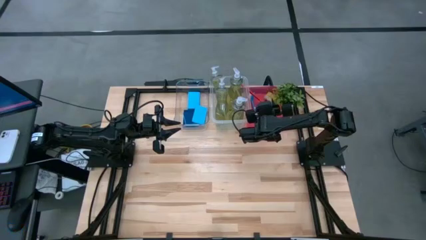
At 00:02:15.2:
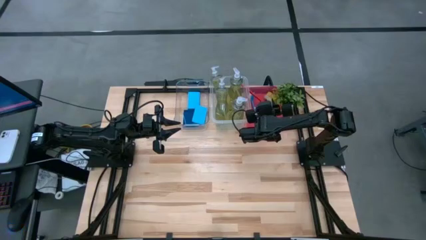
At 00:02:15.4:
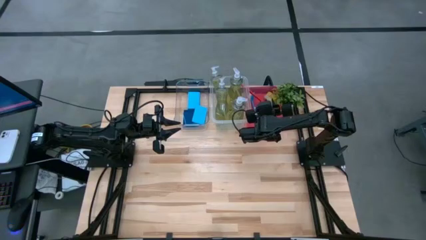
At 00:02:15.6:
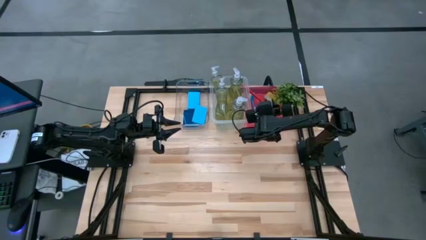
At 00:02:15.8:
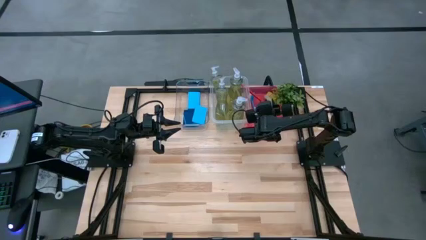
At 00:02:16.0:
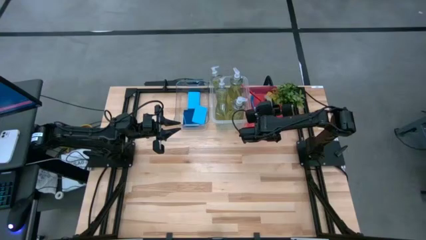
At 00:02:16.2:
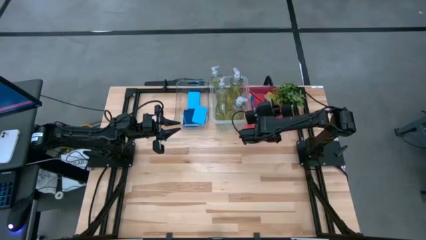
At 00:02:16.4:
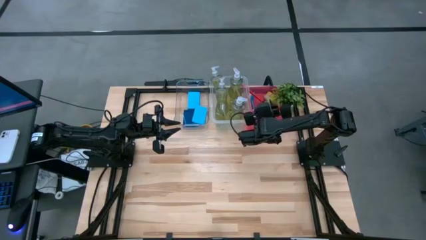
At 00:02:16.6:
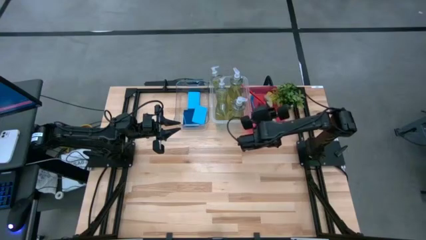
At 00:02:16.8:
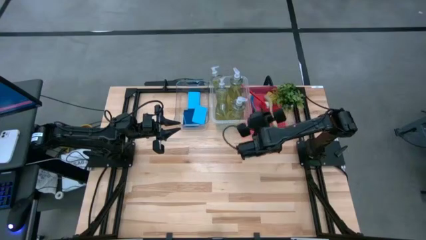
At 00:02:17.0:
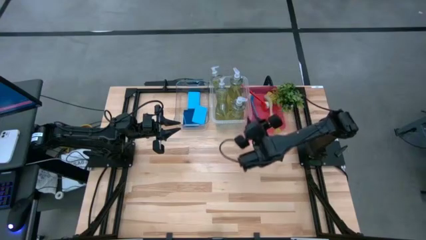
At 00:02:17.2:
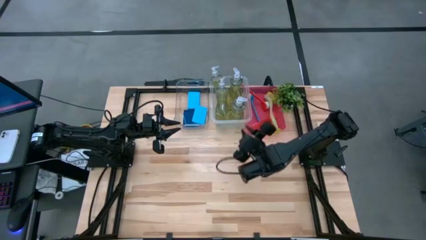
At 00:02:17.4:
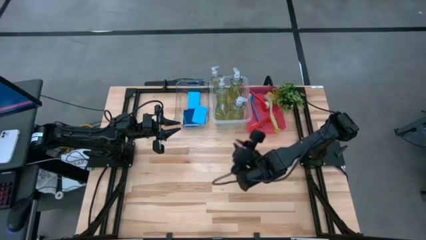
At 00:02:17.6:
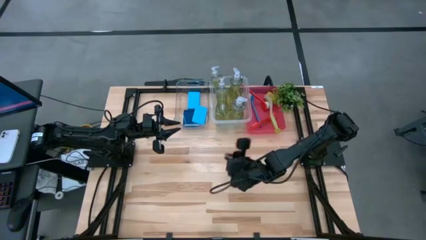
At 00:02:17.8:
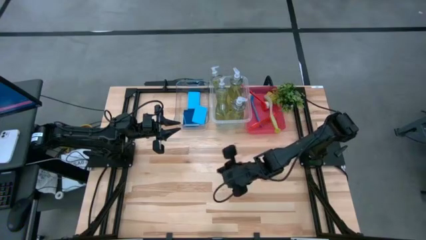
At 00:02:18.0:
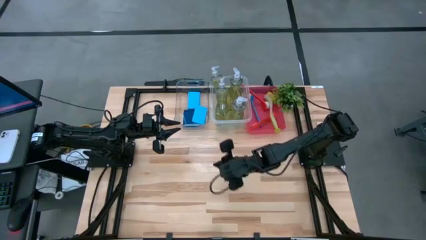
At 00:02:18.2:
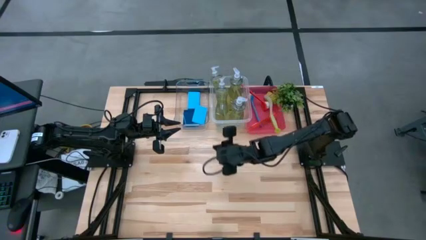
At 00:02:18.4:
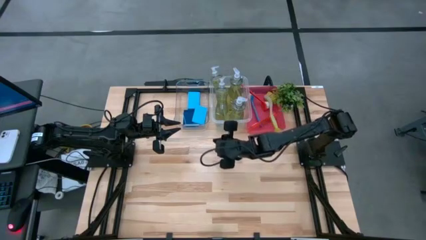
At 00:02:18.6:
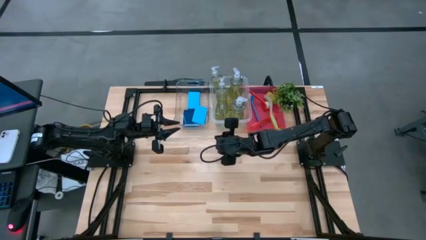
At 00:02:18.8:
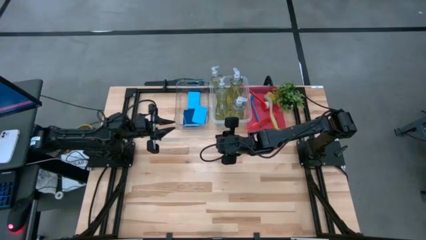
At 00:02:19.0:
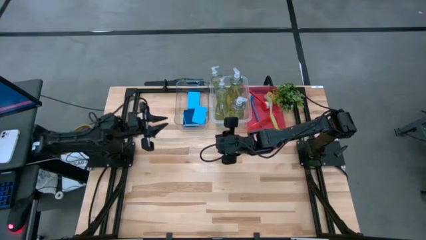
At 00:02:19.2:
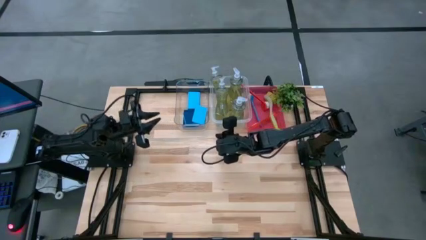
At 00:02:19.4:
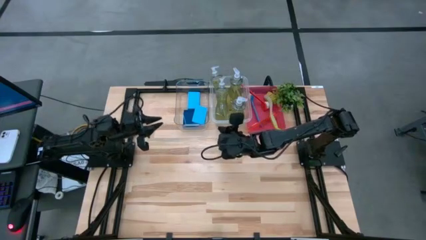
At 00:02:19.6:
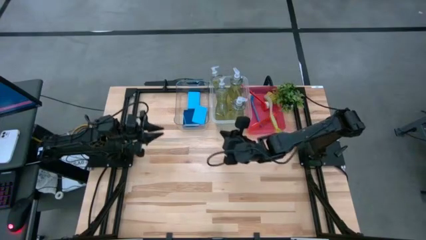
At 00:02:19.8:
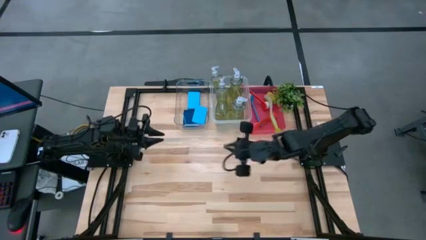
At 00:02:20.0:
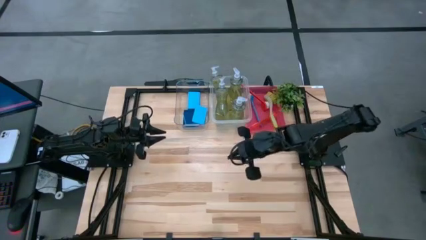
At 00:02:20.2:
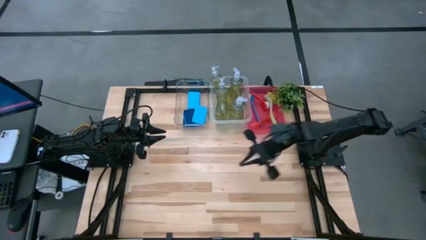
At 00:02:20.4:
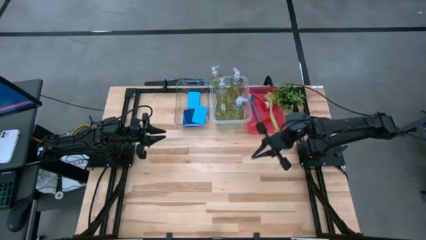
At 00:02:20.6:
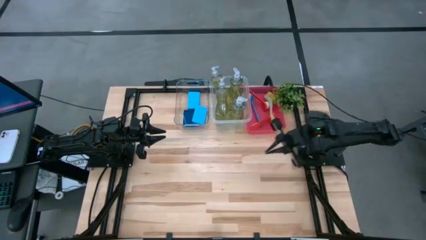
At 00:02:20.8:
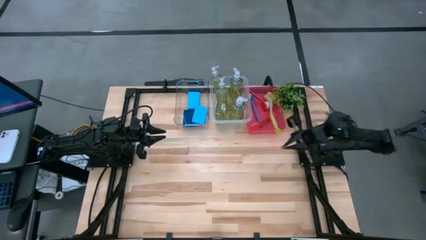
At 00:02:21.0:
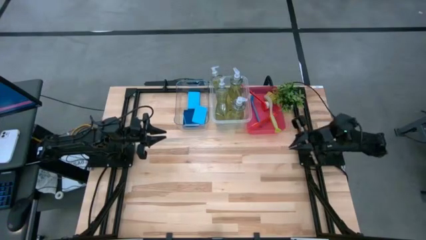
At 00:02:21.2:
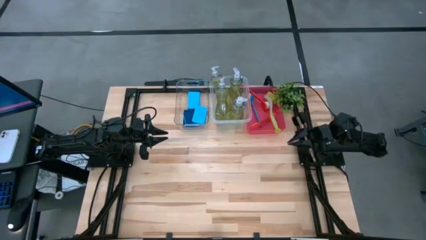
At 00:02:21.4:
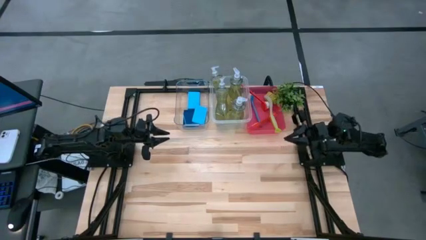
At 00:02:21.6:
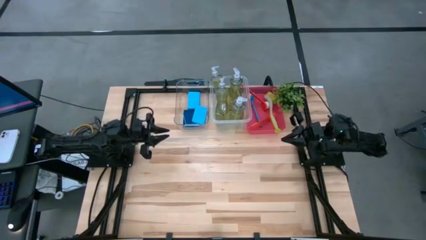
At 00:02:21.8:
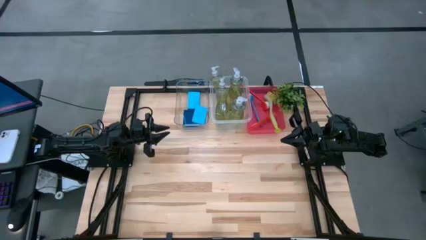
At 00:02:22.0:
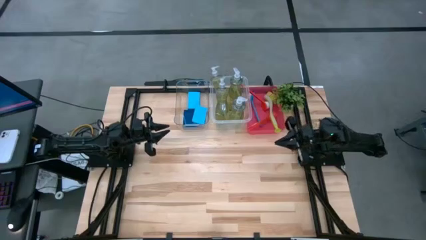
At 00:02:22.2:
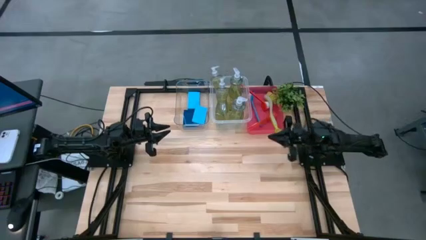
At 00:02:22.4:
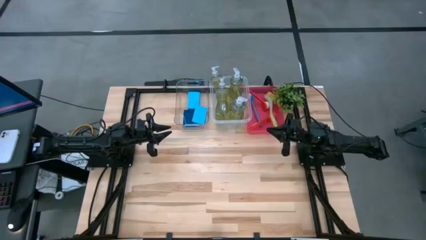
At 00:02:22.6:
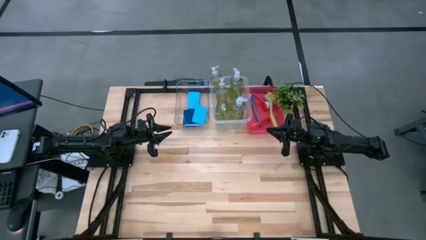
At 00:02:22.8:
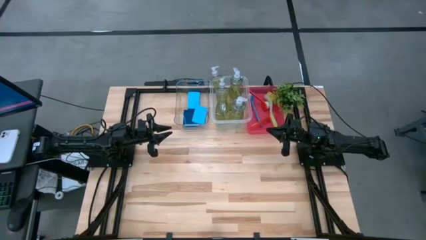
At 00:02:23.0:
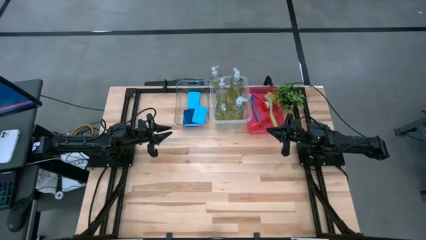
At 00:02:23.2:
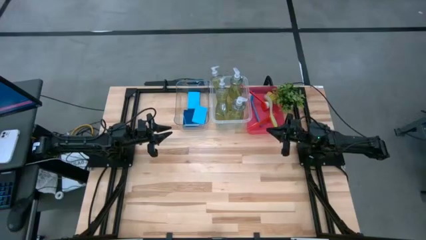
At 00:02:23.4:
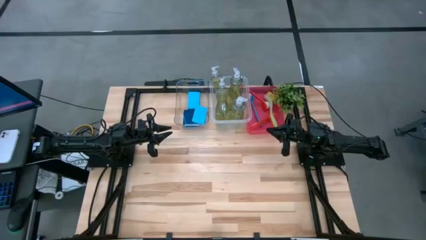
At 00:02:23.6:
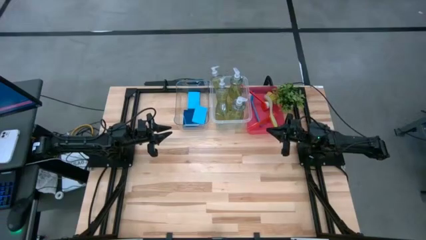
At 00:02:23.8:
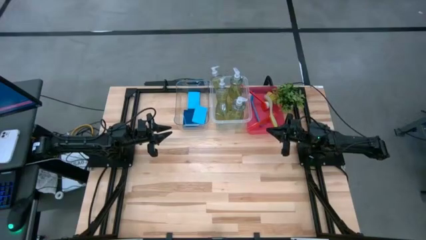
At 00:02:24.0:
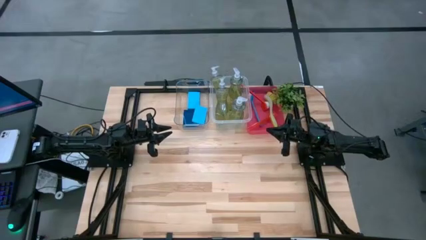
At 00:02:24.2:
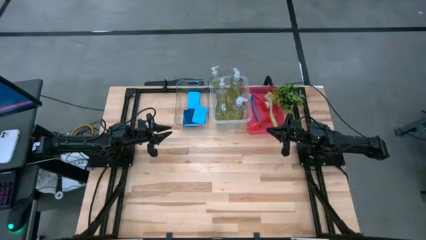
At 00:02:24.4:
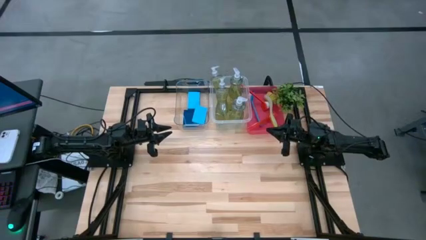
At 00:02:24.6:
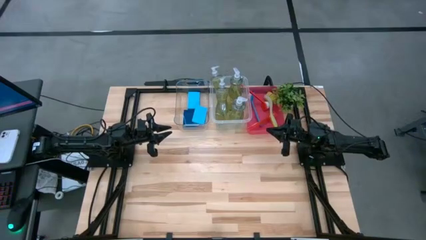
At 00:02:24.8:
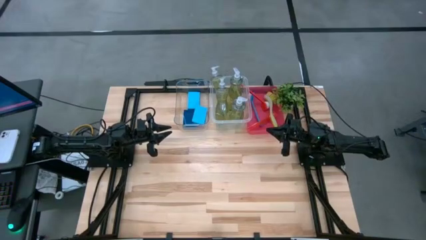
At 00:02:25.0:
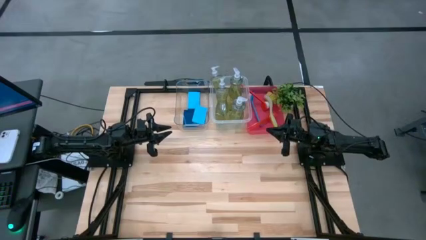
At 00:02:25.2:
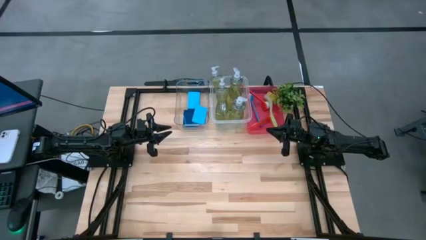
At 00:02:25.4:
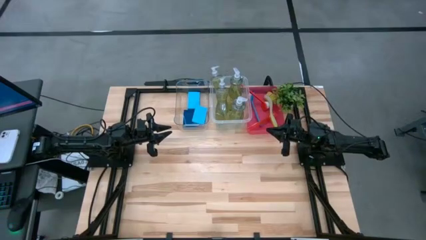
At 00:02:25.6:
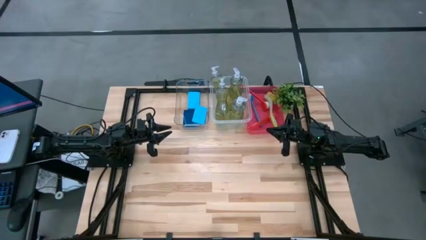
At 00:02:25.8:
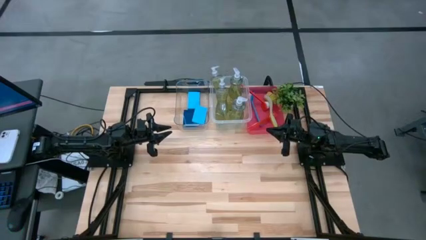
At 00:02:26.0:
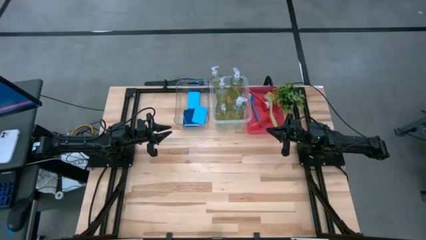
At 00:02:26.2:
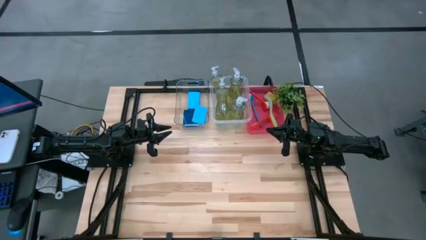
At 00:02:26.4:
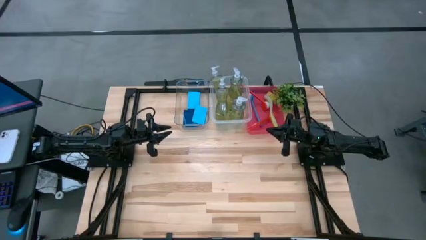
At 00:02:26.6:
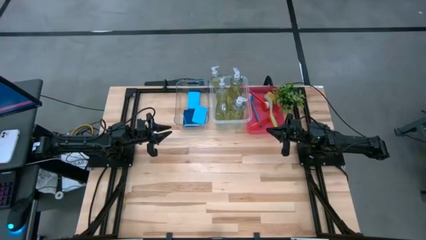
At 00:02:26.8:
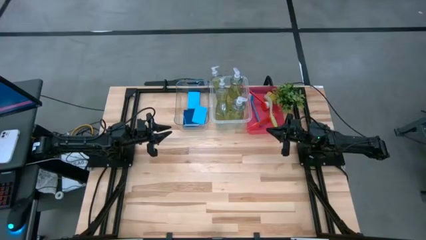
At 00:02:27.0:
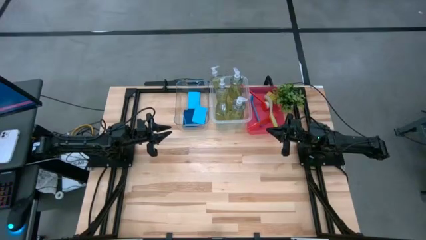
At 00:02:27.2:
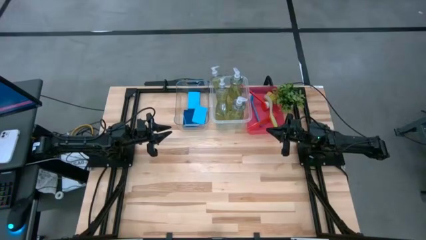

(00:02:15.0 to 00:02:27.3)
Task: Pick & Place Kitchen Sink Supplies
Return to Home Position
